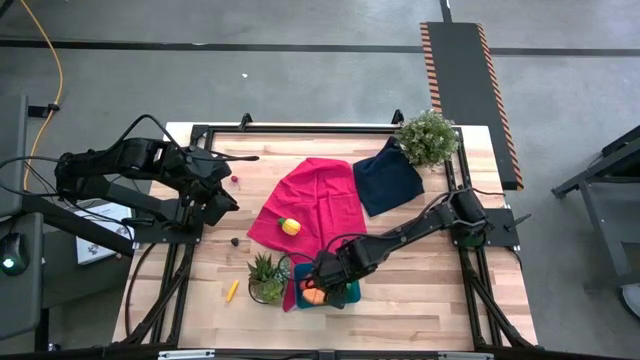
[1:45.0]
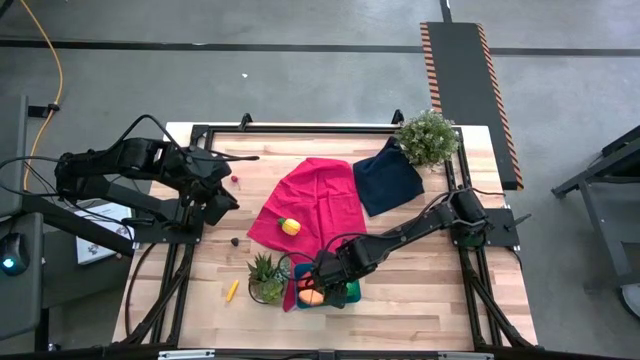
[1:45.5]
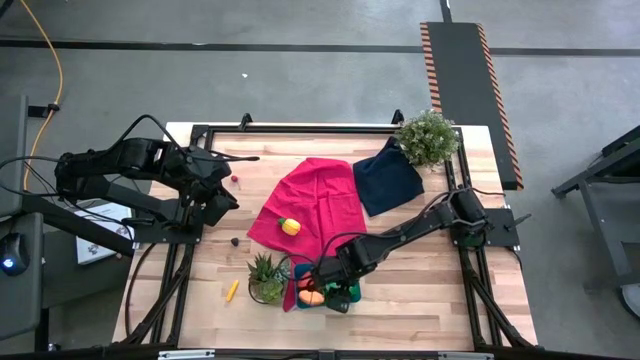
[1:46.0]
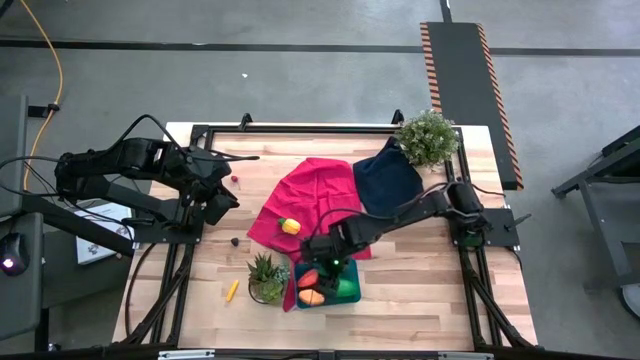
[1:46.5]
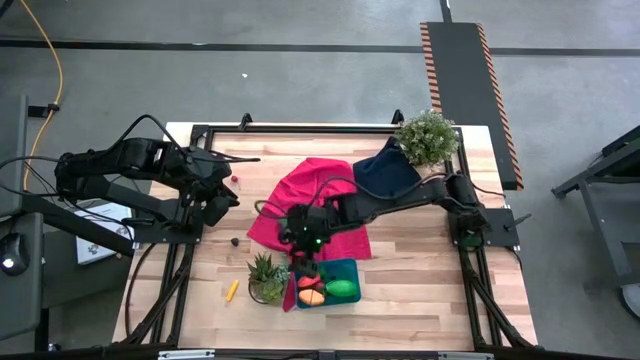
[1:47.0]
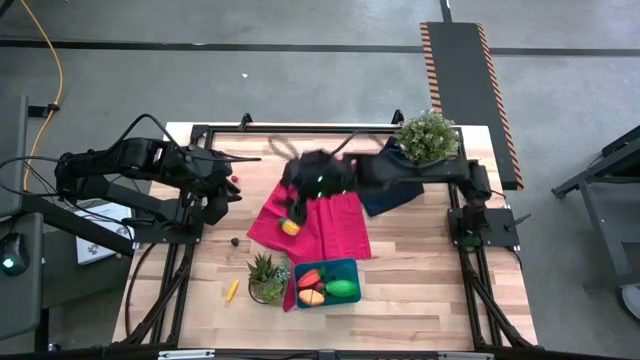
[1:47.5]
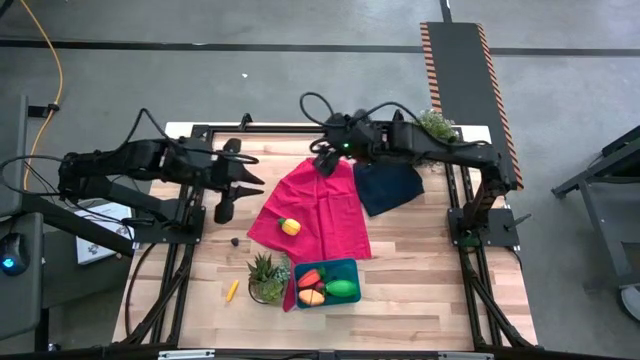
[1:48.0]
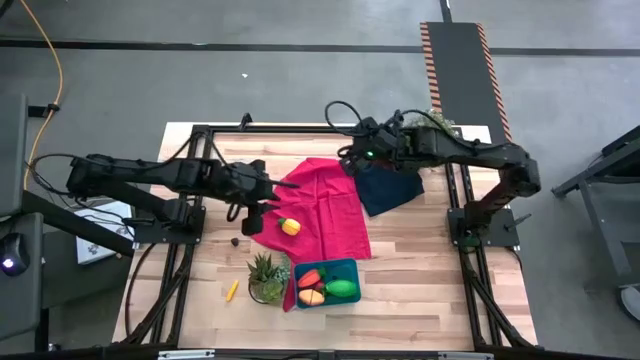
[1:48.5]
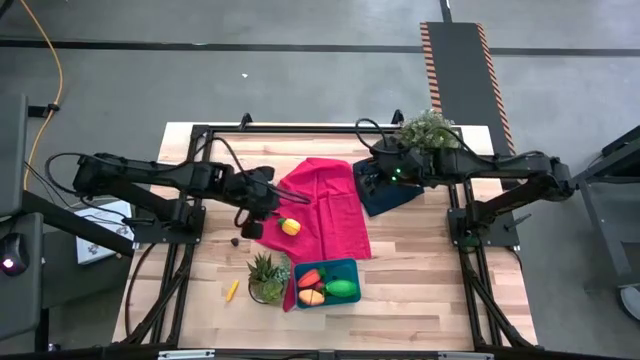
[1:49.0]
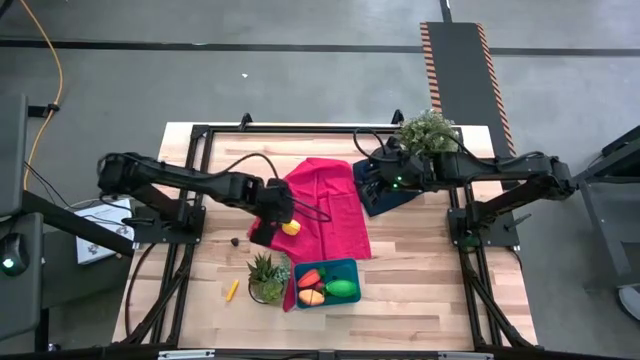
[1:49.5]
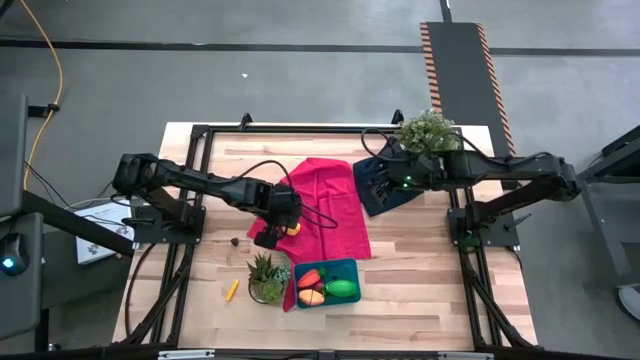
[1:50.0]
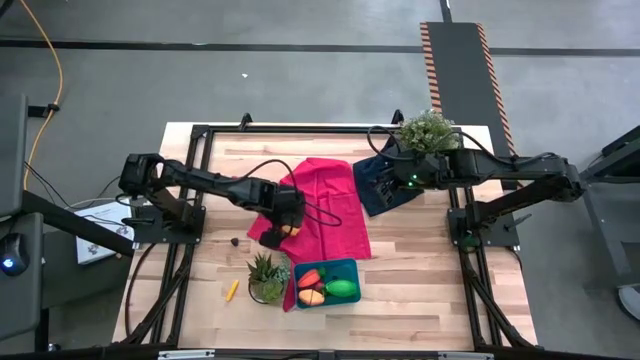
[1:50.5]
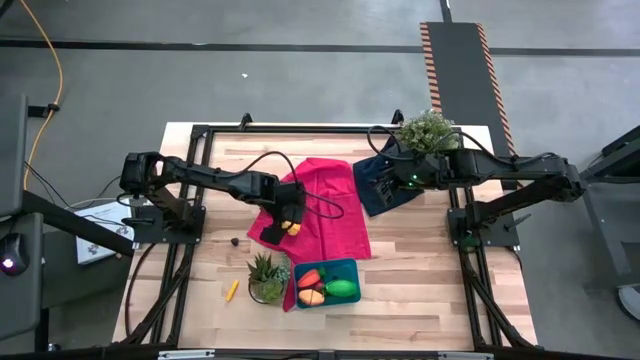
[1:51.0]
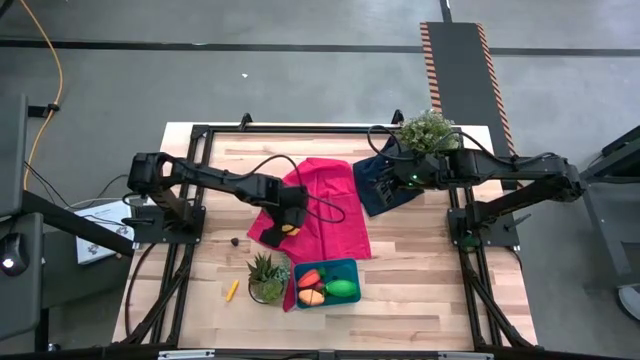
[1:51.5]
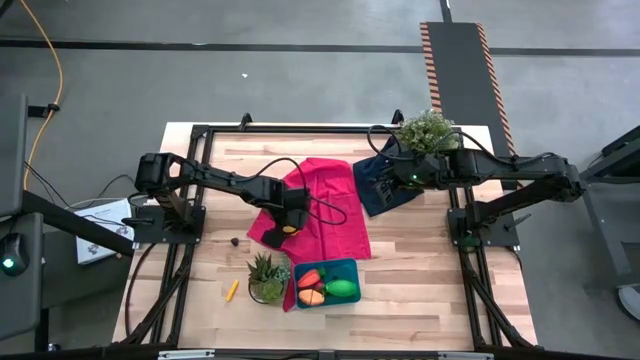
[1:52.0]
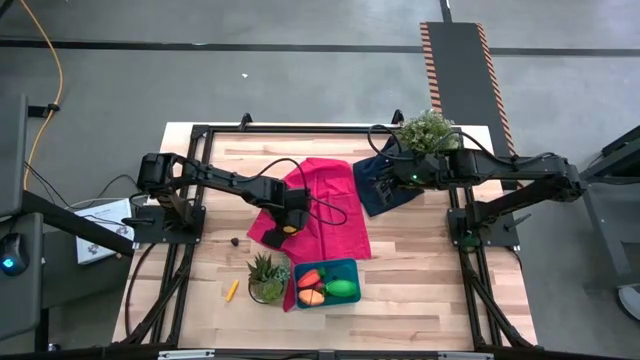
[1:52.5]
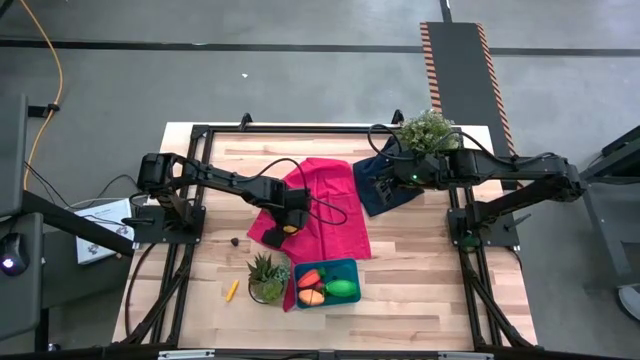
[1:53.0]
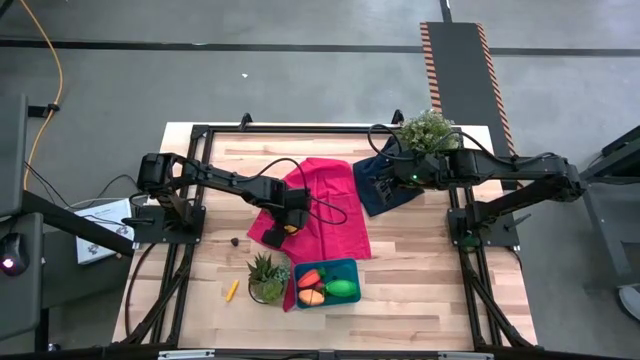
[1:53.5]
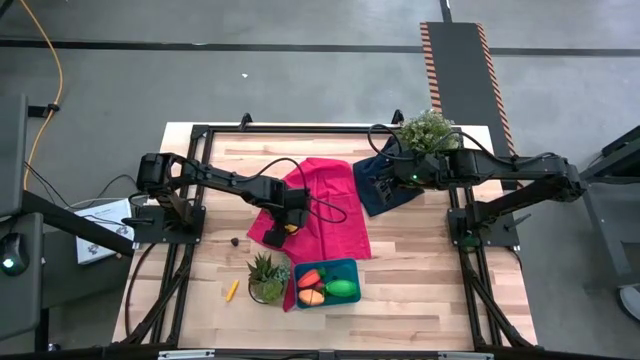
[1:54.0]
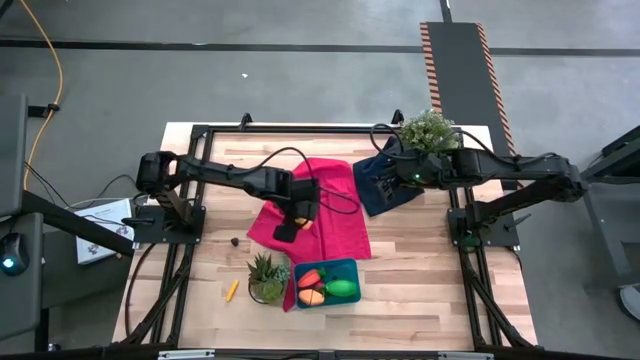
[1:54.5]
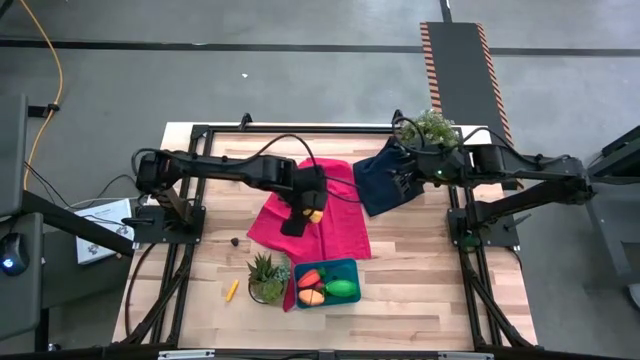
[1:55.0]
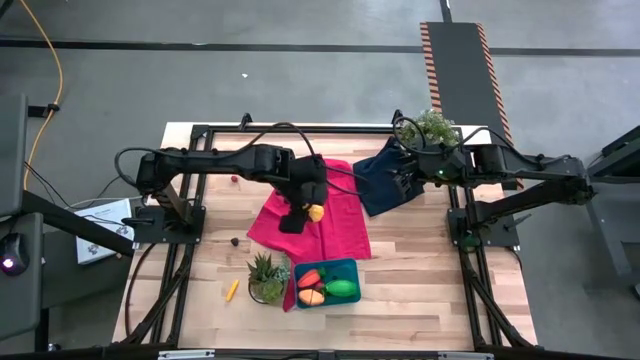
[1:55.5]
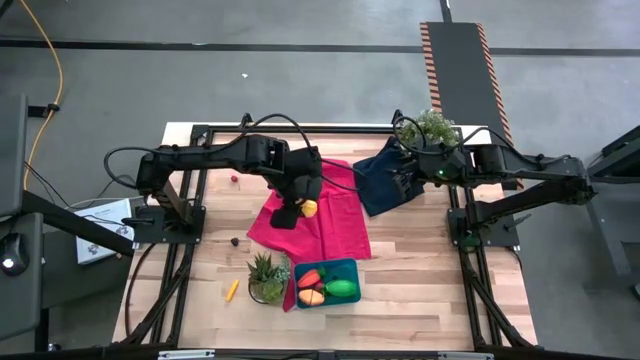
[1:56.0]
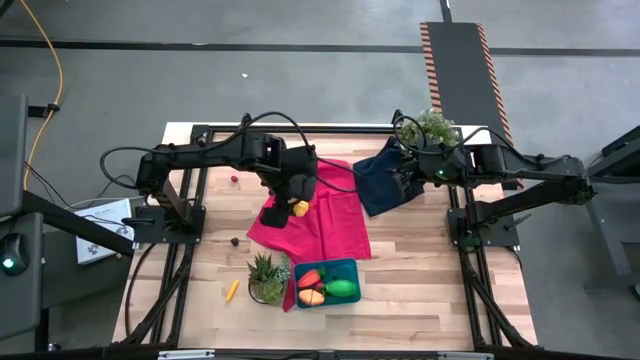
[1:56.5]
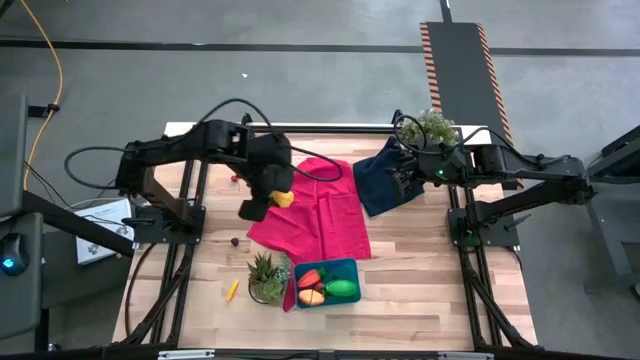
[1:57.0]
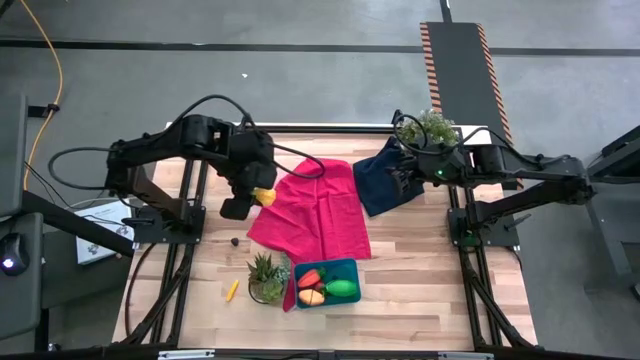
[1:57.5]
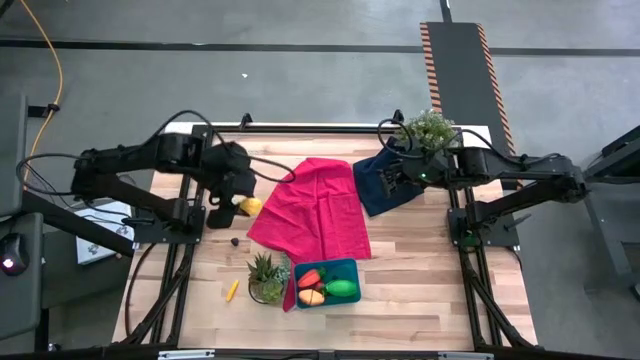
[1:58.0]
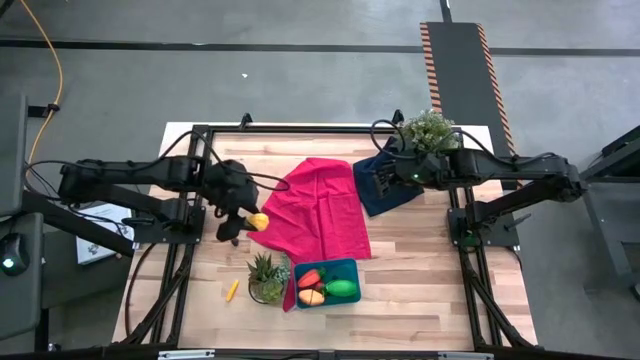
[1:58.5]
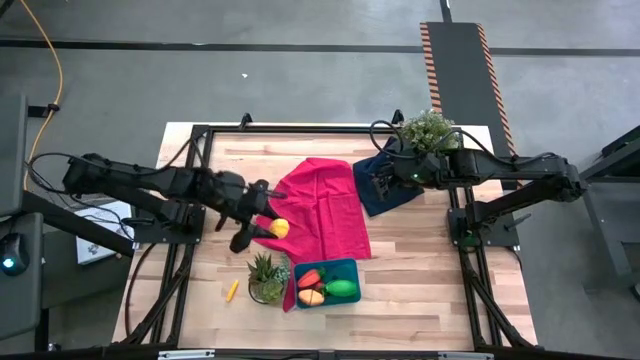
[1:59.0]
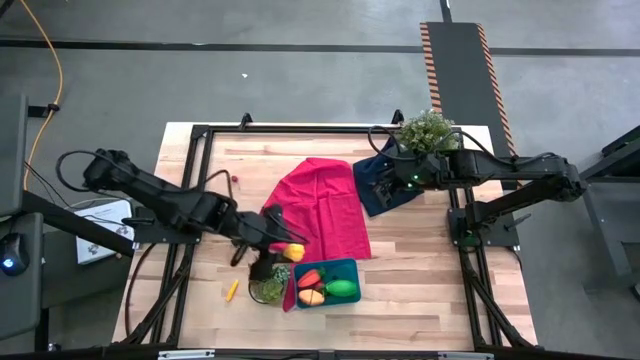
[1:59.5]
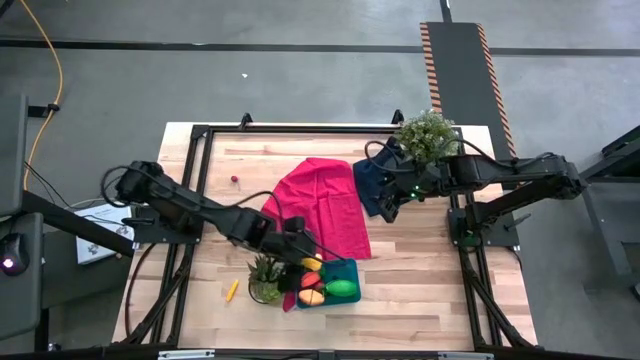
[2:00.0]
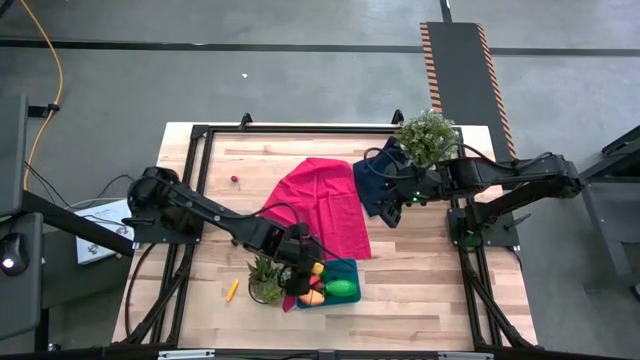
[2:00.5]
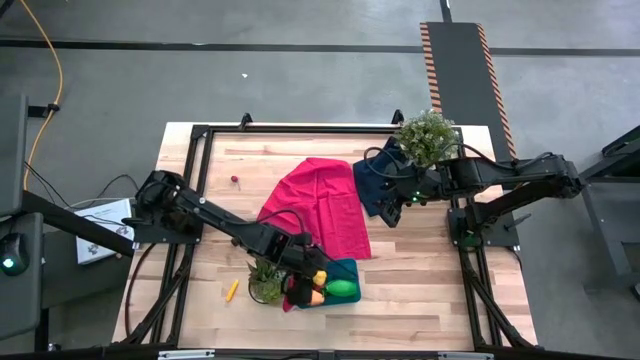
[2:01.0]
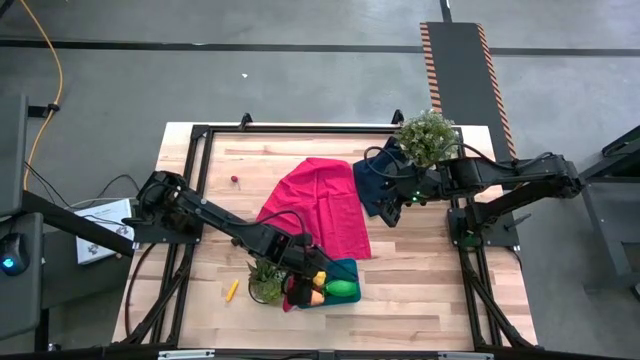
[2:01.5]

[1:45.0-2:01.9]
Task: Pick and placing Produce into tupperware
Put the yellow pineapple into the blue bin

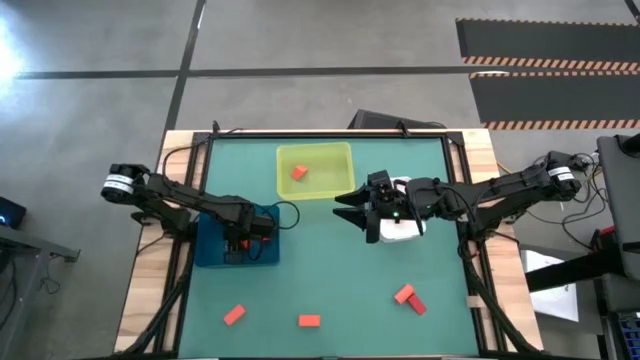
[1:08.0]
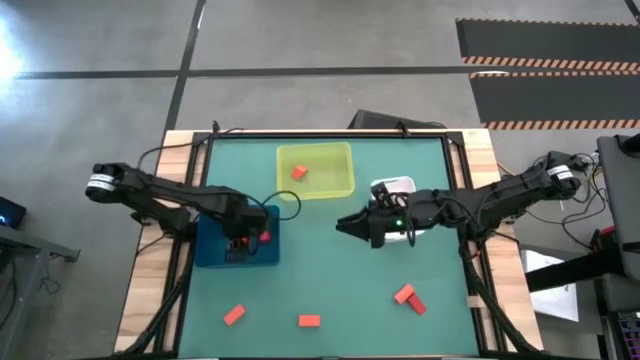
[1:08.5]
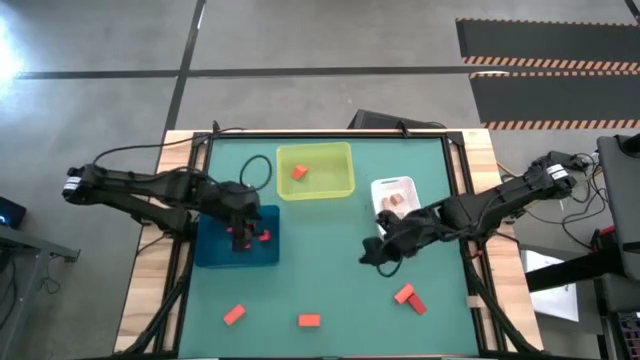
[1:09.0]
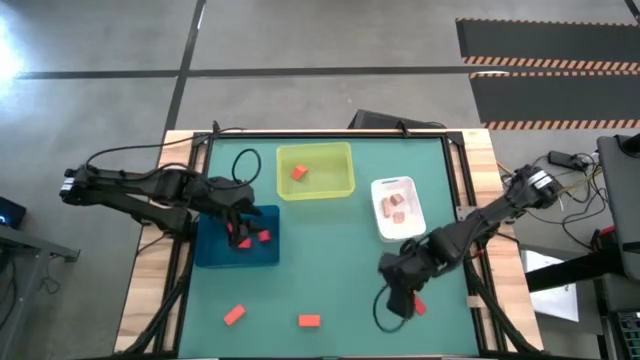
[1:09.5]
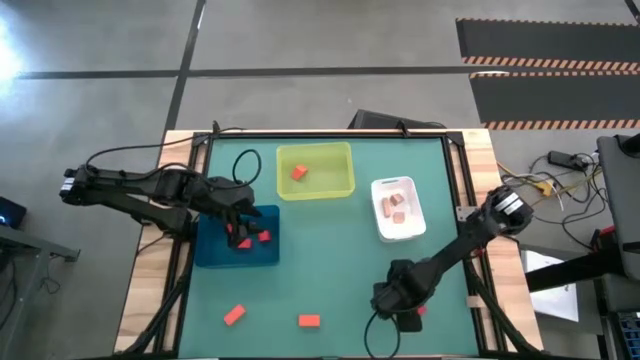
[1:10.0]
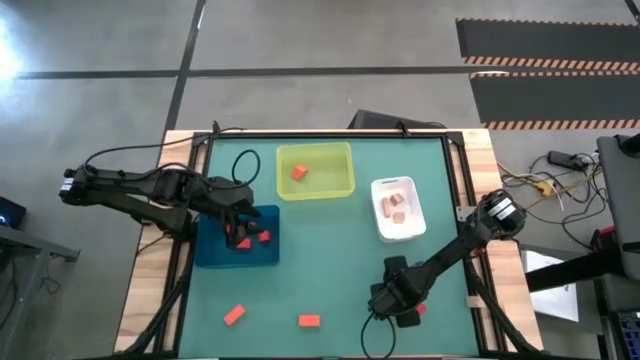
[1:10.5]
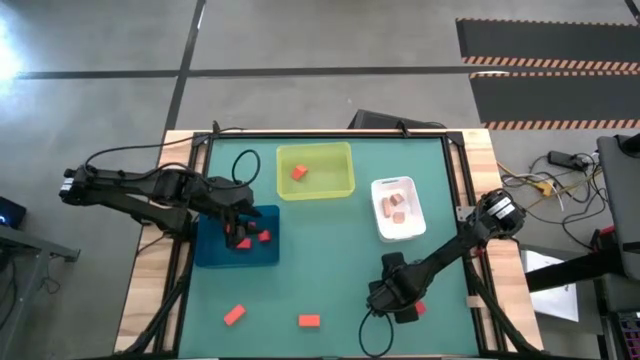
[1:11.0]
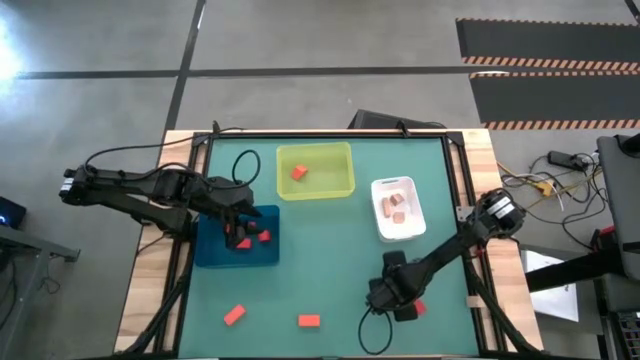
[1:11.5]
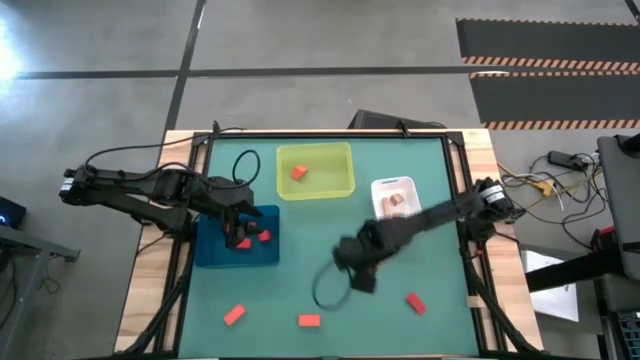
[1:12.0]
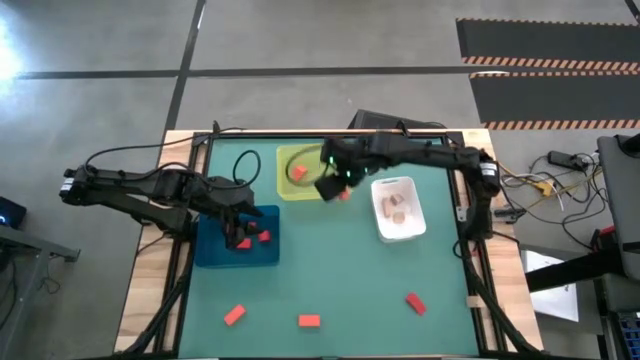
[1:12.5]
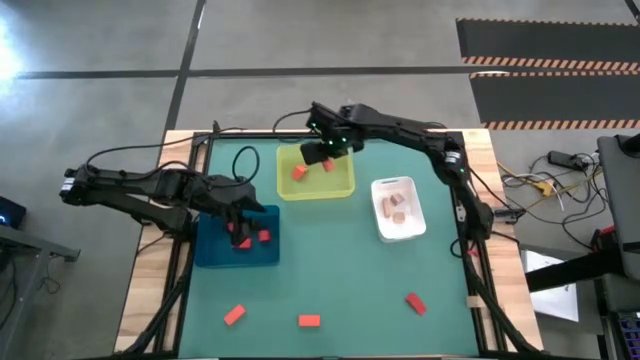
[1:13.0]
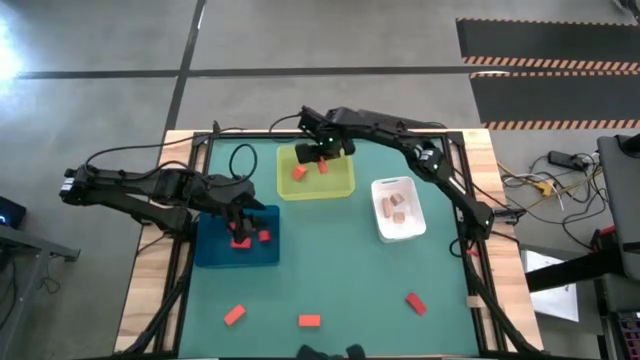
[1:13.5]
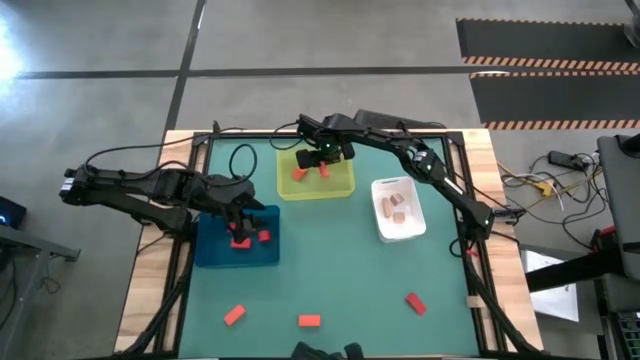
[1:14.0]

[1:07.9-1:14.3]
Task: Sort & place blocks by color
Put the orange block into the yellow bin
